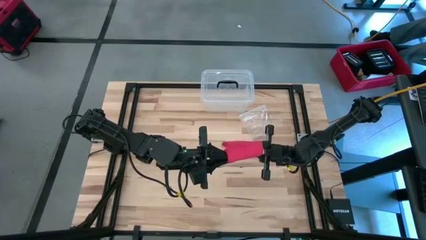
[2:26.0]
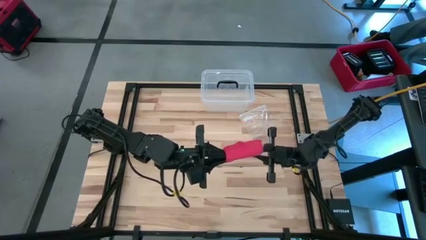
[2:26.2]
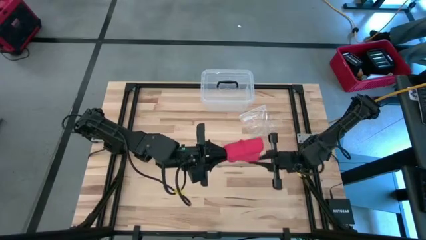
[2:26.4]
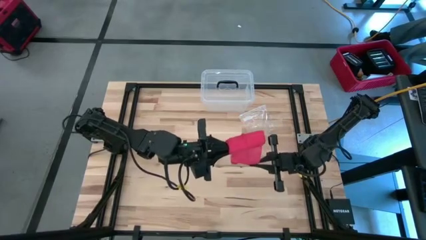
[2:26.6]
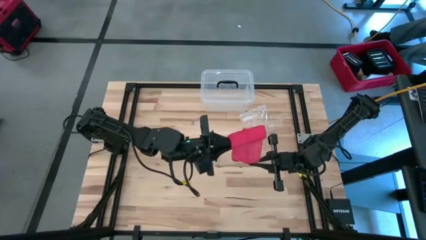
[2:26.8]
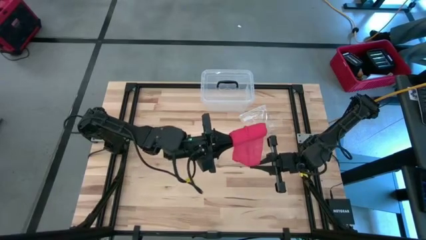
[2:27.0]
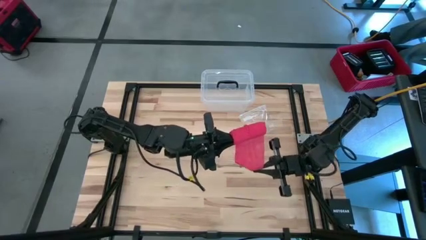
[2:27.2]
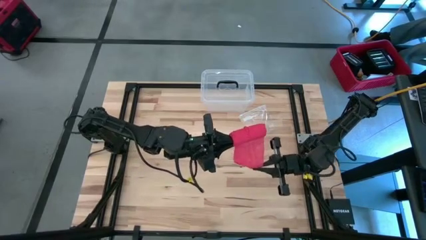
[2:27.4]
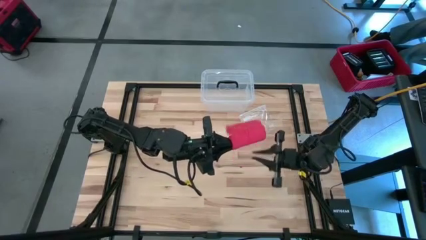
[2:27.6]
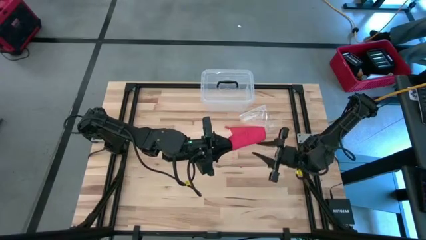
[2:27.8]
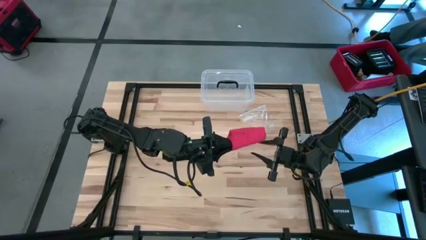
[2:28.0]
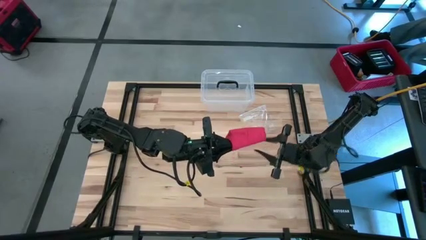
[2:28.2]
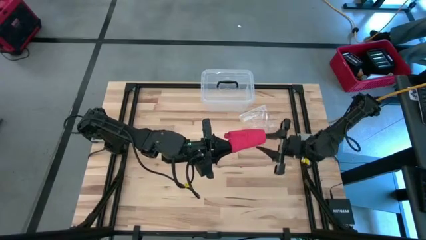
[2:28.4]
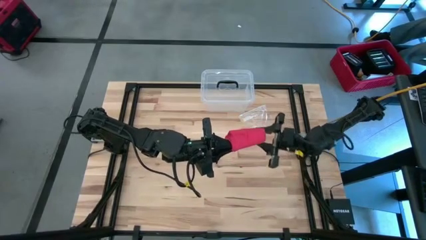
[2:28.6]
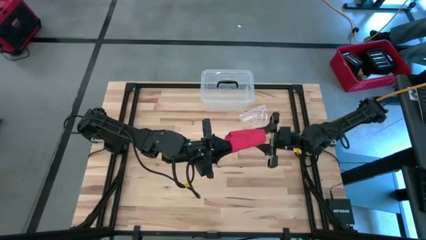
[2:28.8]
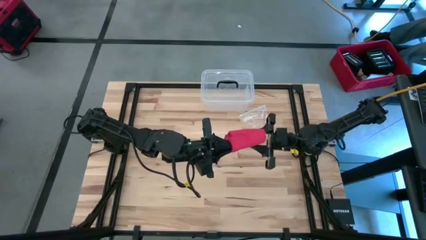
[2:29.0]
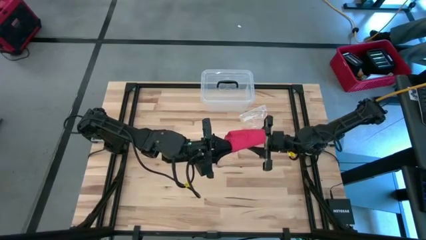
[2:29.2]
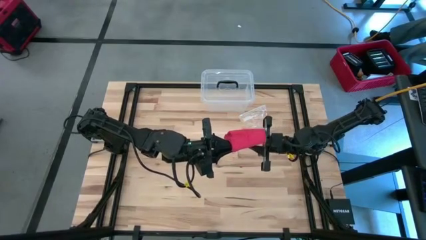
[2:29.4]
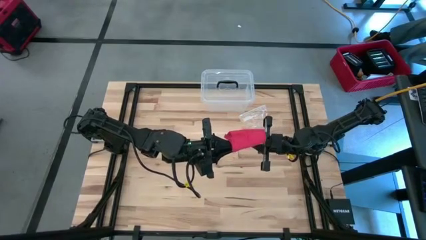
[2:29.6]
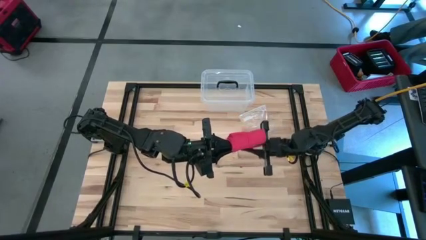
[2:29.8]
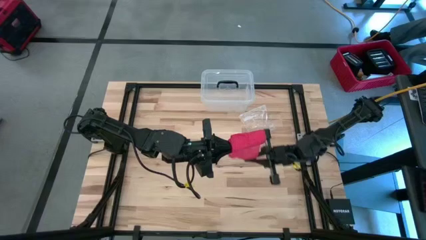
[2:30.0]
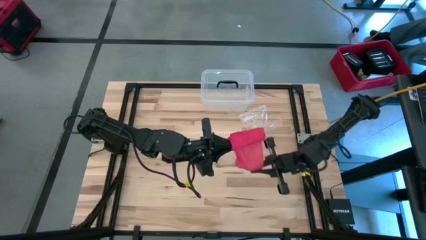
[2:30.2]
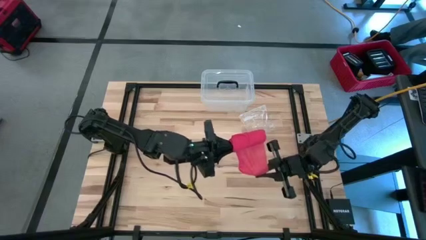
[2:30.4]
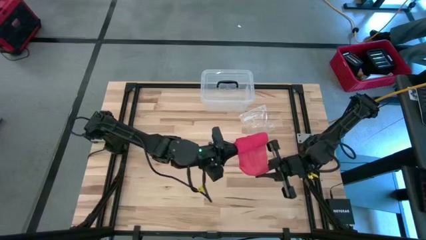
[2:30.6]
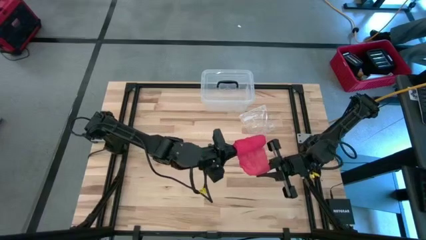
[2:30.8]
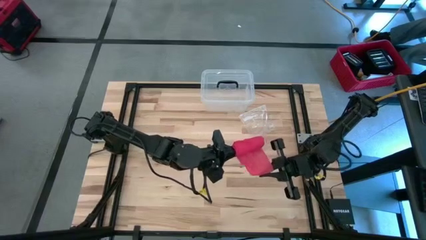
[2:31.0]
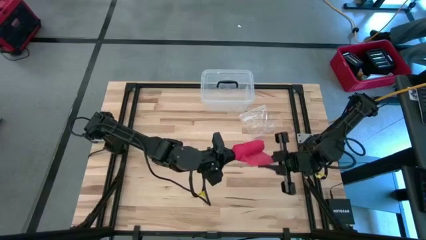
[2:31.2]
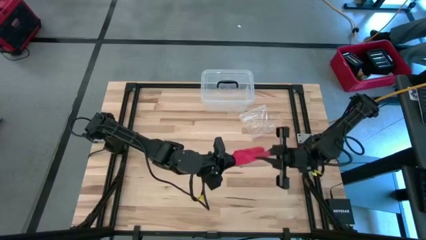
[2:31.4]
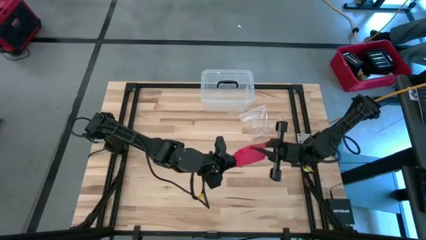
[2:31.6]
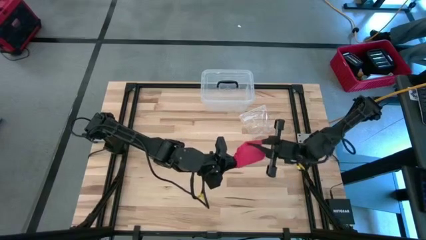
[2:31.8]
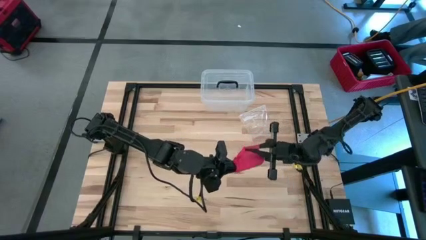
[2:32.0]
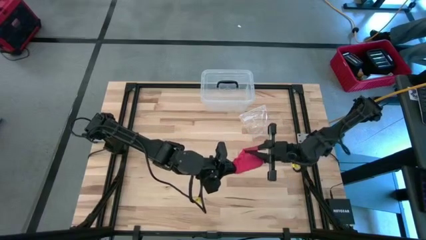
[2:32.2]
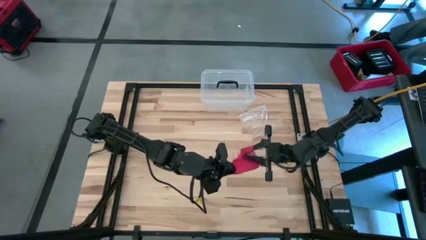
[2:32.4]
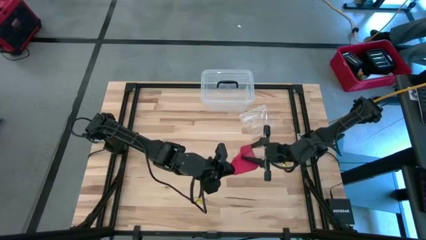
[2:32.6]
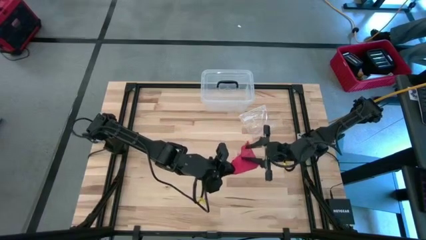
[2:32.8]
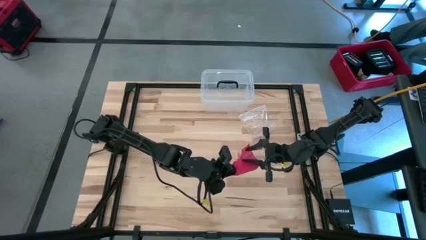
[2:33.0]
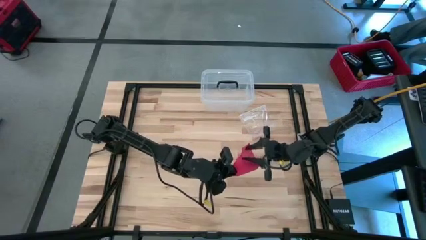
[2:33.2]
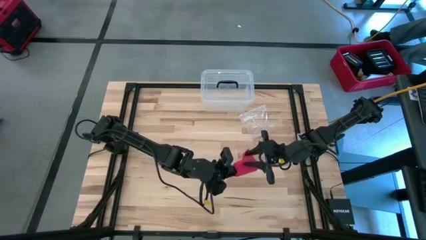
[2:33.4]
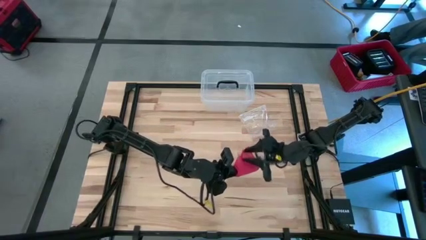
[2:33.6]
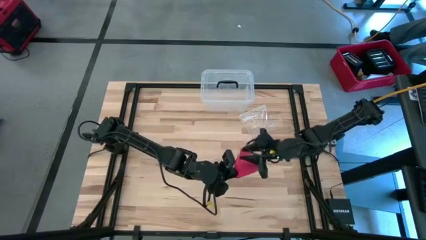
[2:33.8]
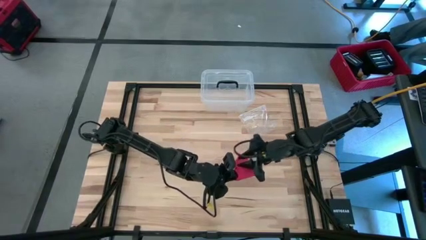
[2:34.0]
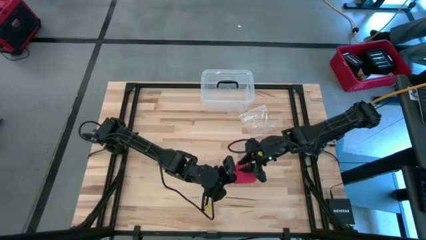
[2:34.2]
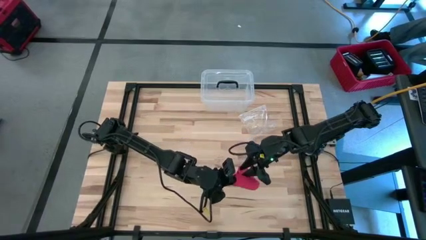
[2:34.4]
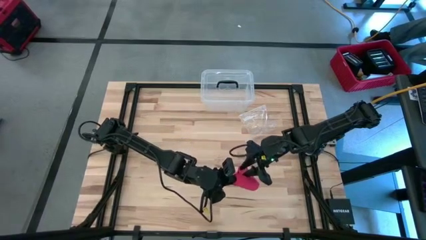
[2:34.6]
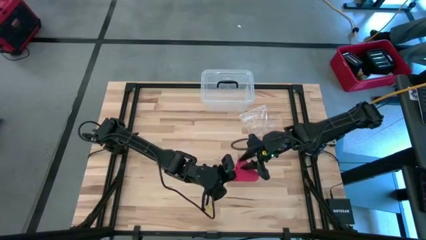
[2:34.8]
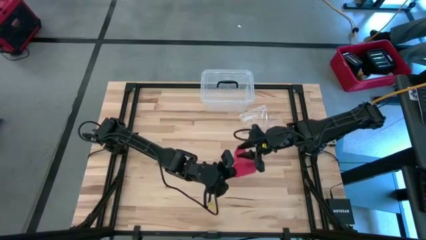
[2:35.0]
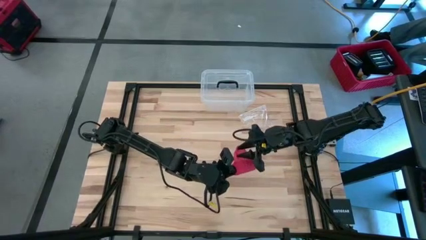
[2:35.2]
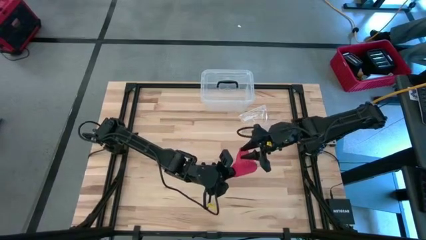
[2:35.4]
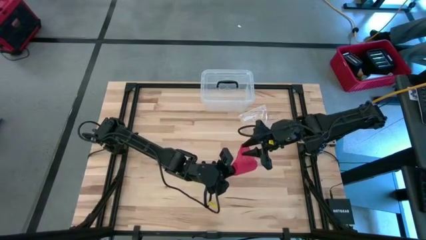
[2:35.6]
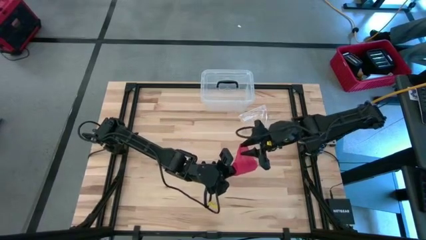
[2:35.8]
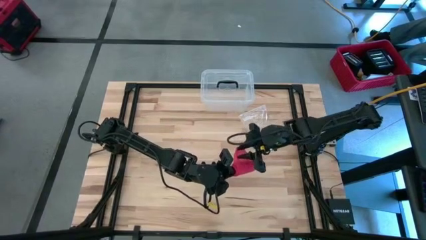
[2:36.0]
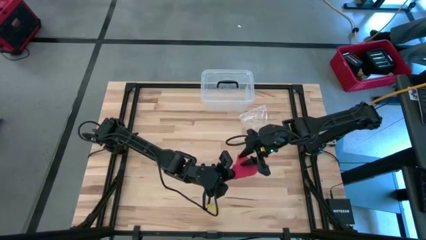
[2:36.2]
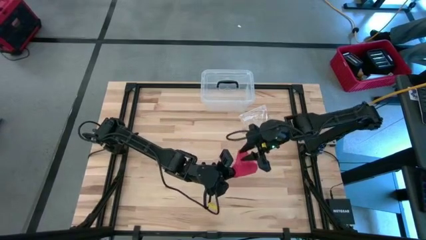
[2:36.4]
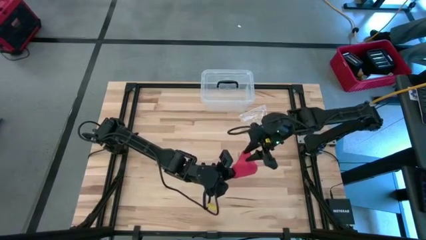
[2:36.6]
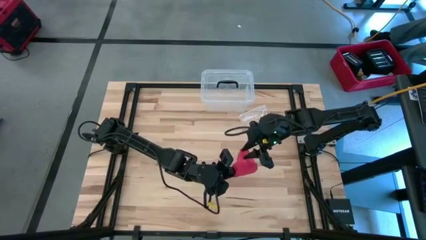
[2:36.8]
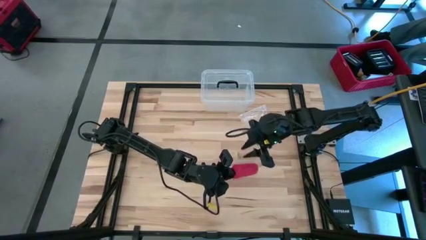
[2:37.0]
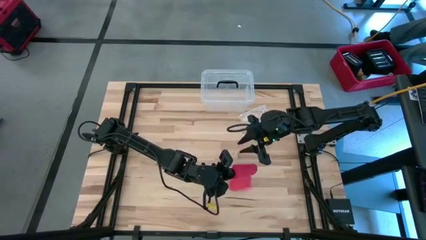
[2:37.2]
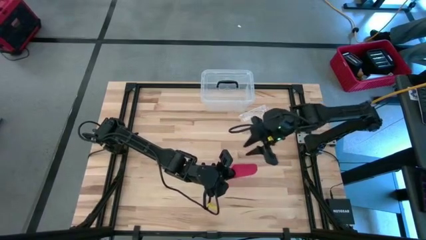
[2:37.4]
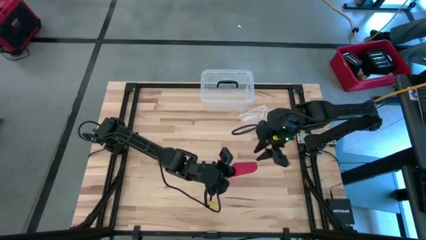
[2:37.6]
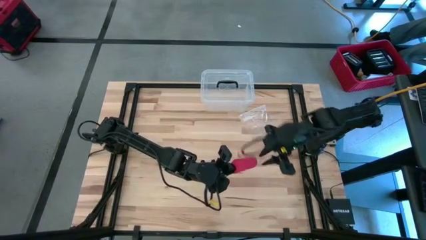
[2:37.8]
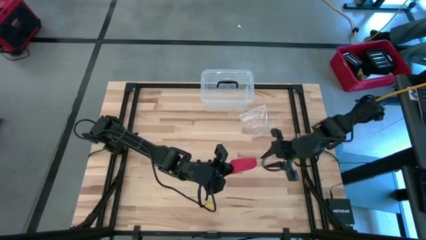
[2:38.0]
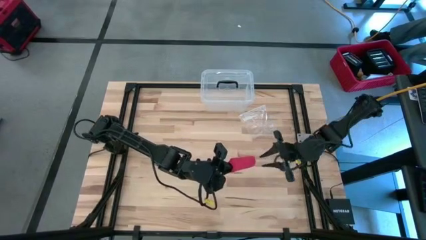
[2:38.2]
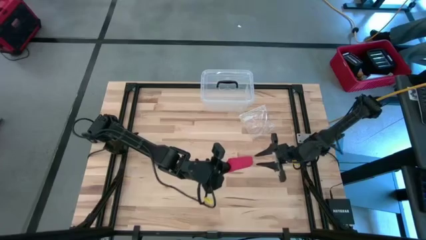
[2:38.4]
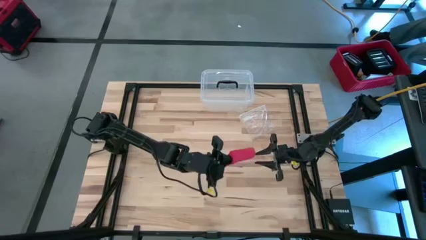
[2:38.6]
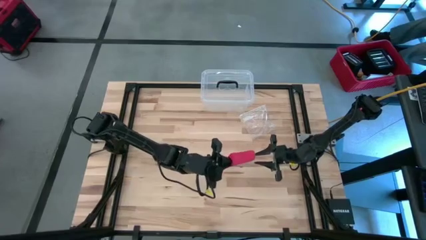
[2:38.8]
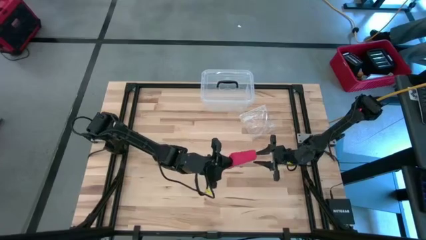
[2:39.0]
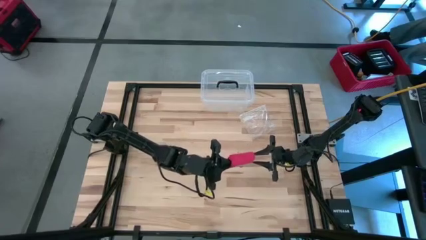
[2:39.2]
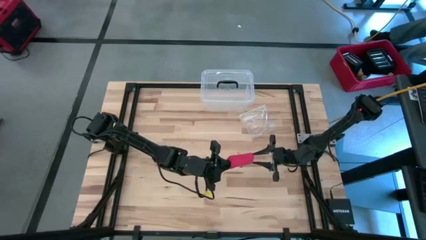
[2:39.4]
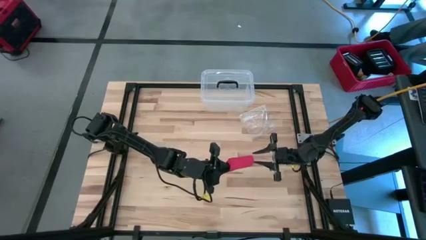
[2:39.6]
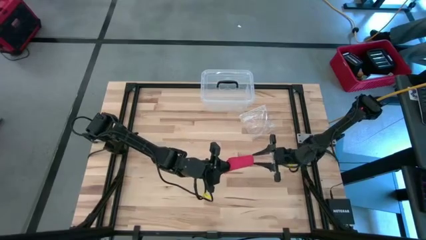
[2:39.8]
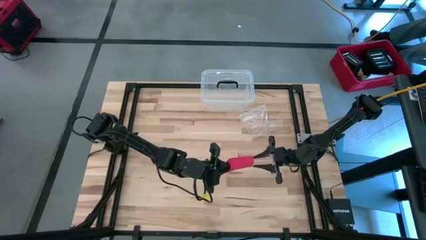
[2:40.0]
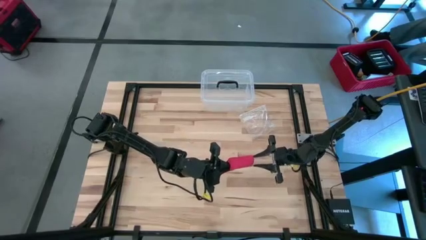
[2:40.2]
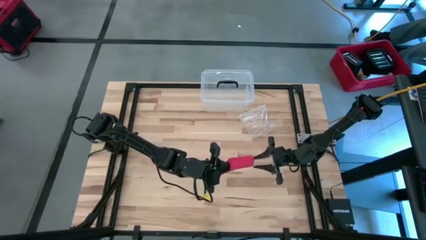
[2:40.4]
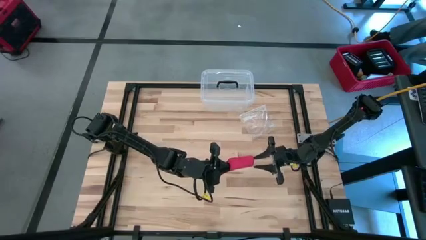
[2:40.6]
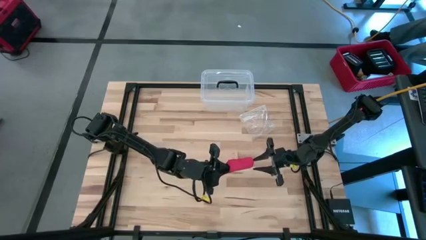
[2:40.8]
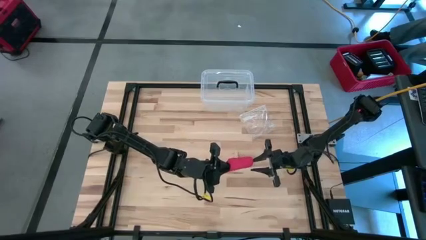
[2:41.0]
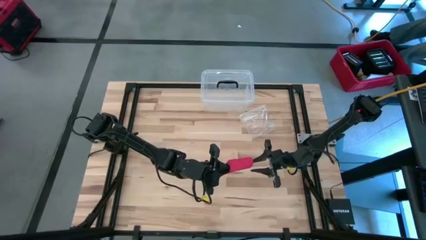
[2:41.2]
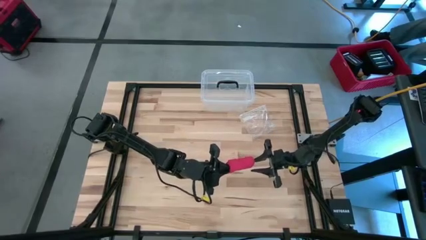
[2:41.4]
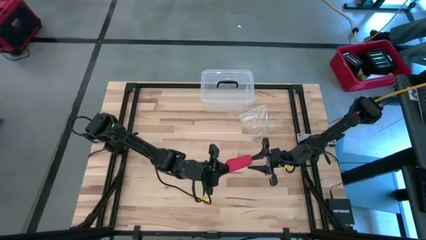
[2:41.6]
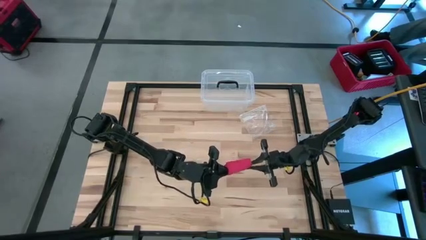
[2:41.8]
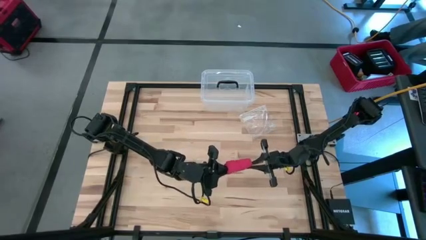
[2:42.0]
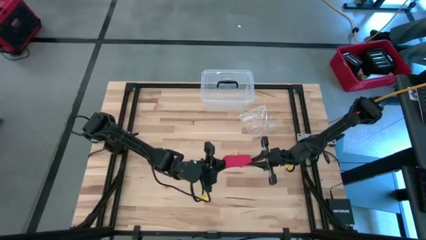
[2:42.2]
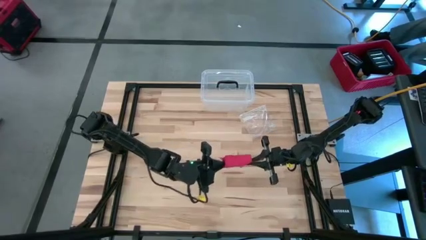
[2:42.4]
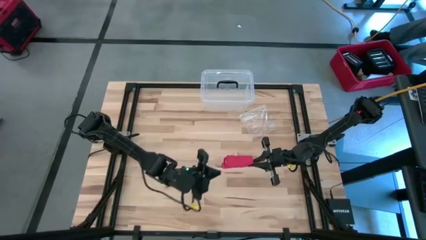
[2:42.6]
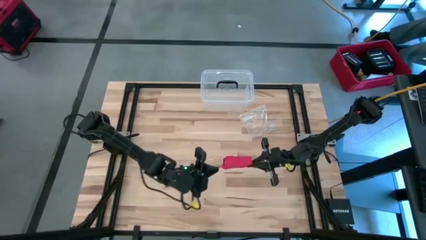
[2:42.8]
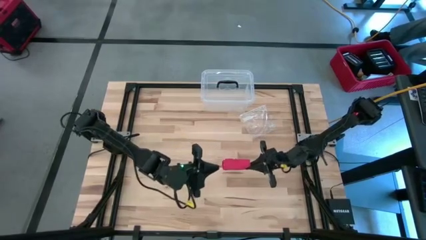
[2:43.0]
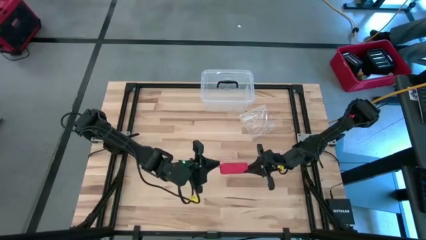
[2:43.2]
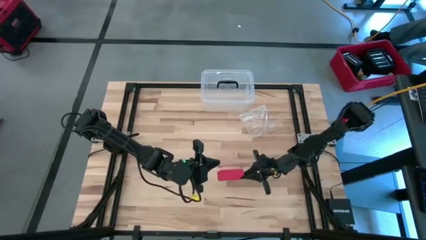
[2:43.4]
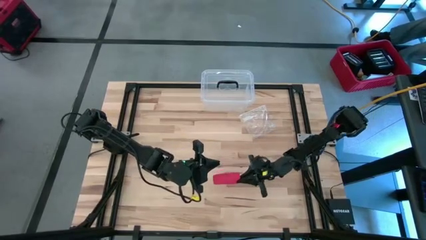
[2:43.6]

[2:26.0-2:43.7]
Task: Roll bandage
Roll the red bandage
